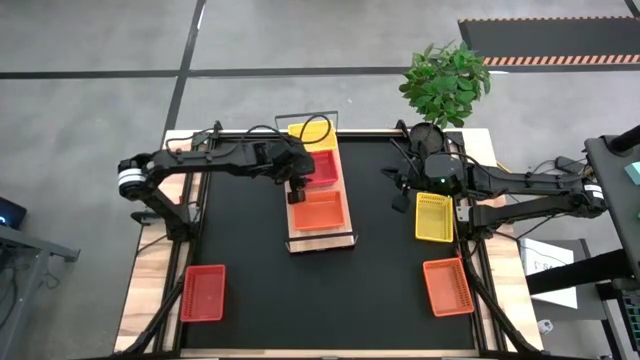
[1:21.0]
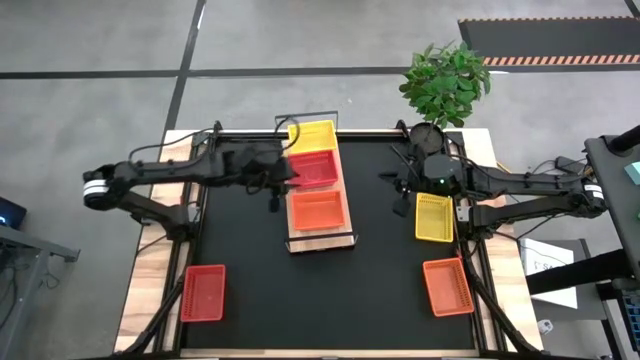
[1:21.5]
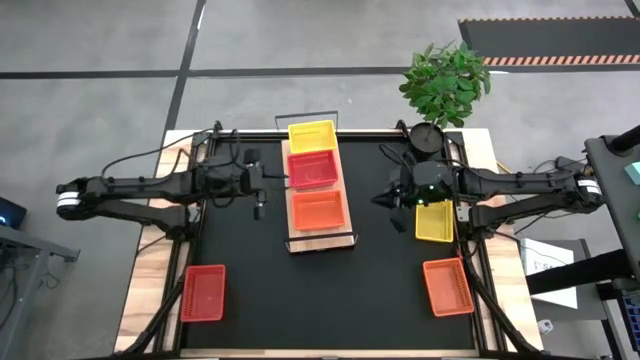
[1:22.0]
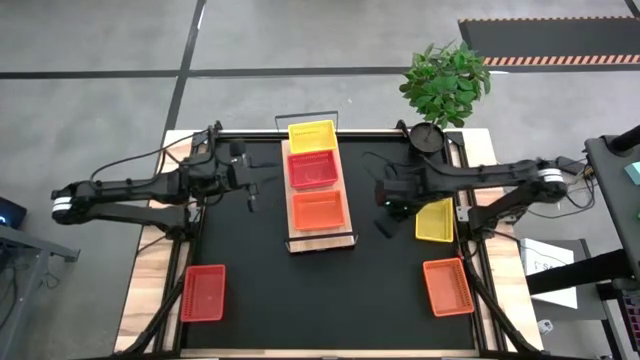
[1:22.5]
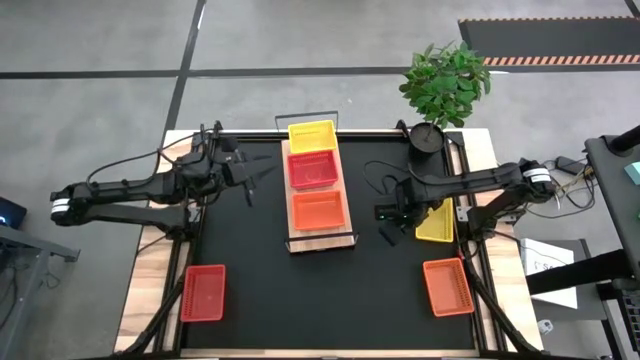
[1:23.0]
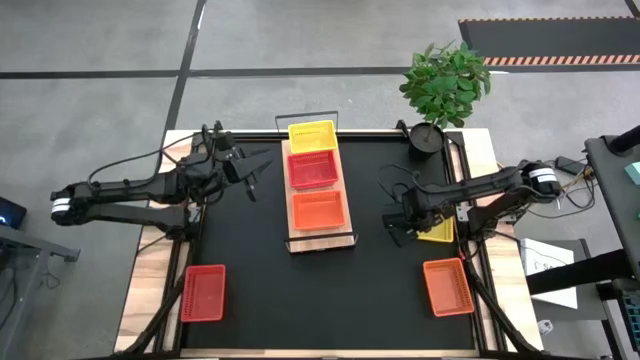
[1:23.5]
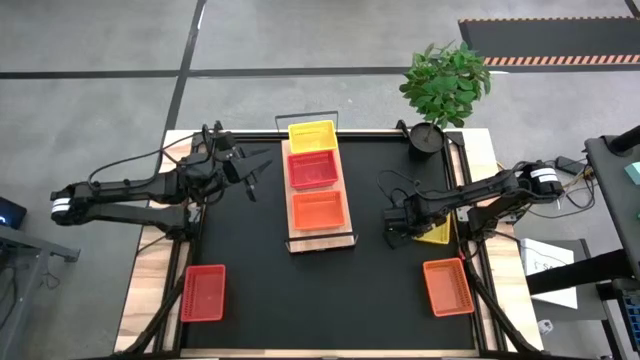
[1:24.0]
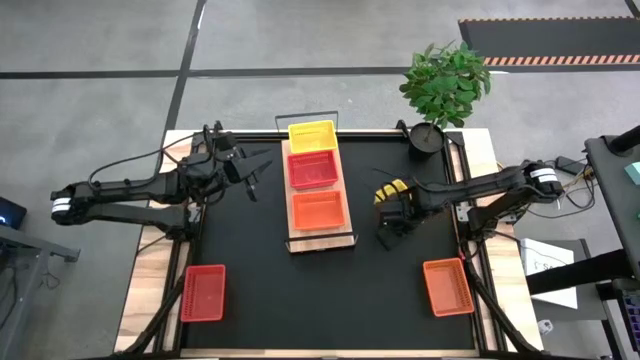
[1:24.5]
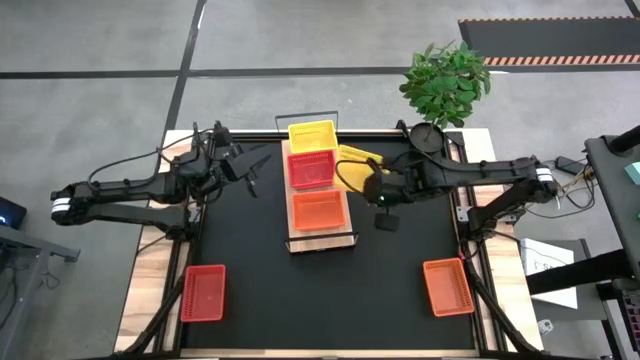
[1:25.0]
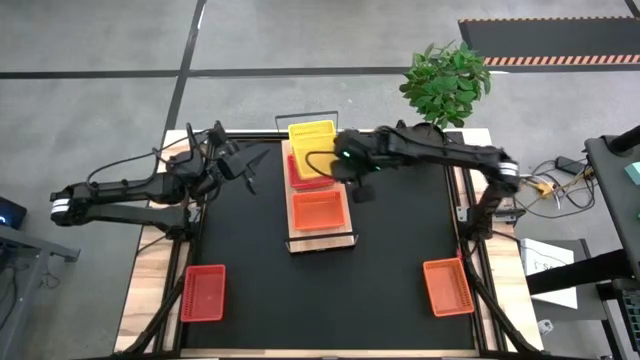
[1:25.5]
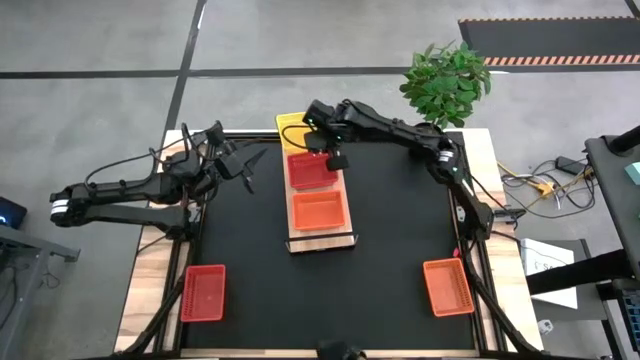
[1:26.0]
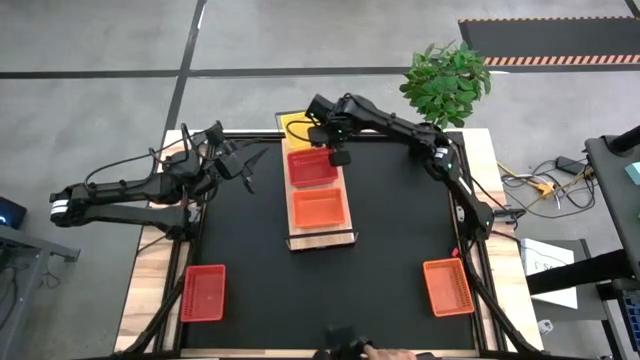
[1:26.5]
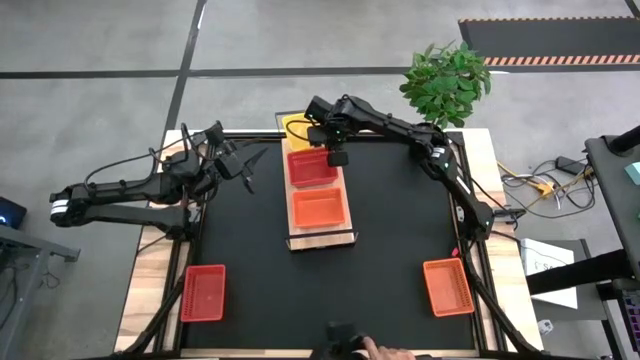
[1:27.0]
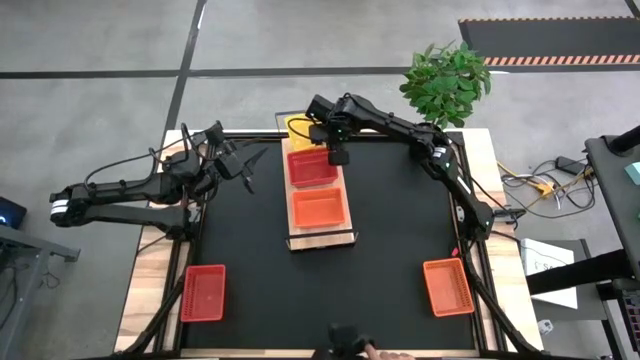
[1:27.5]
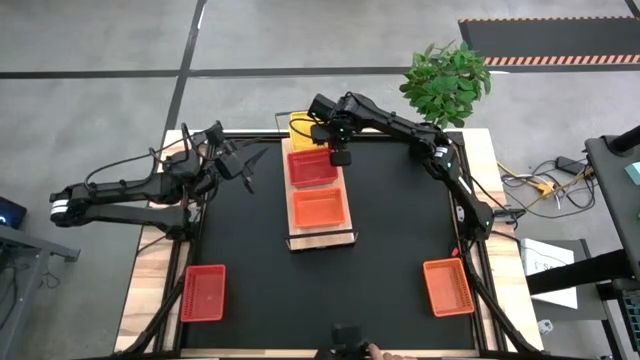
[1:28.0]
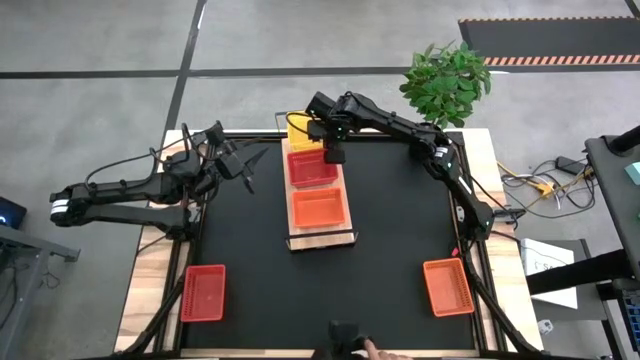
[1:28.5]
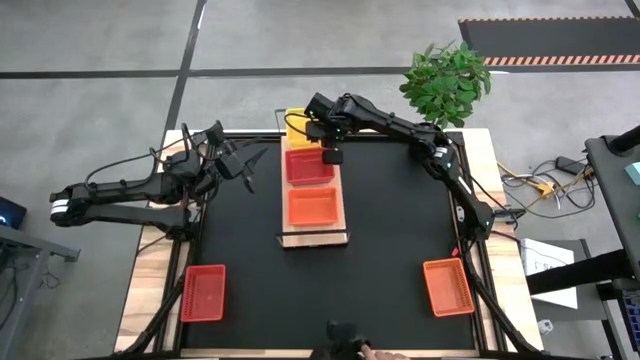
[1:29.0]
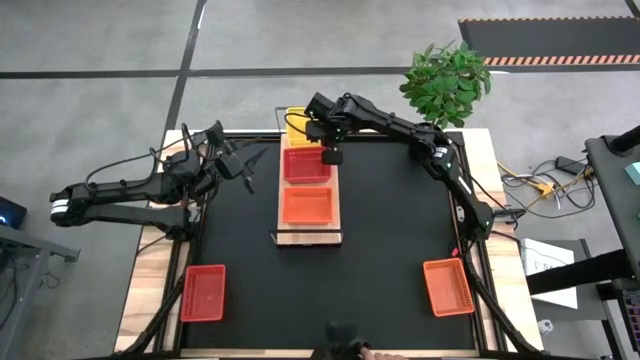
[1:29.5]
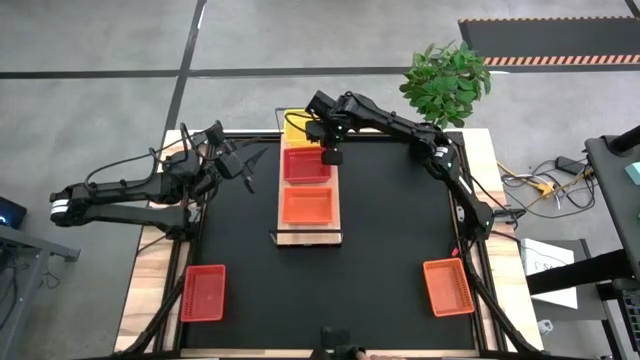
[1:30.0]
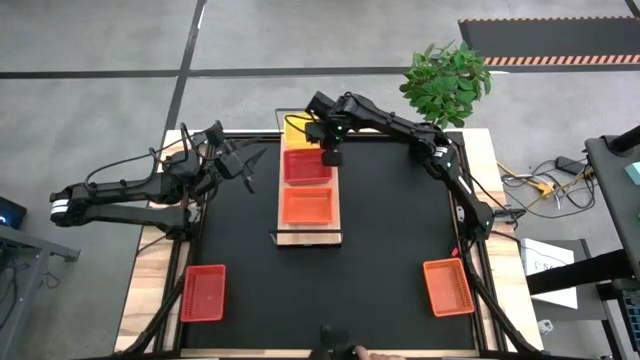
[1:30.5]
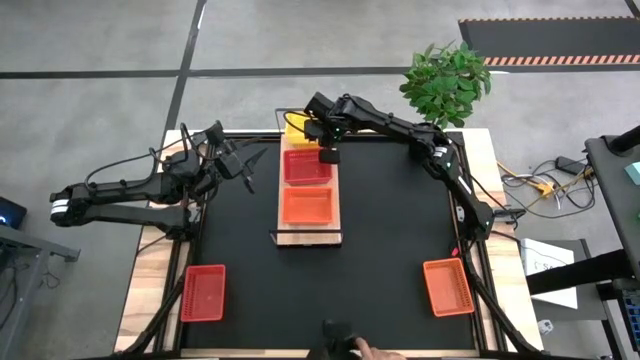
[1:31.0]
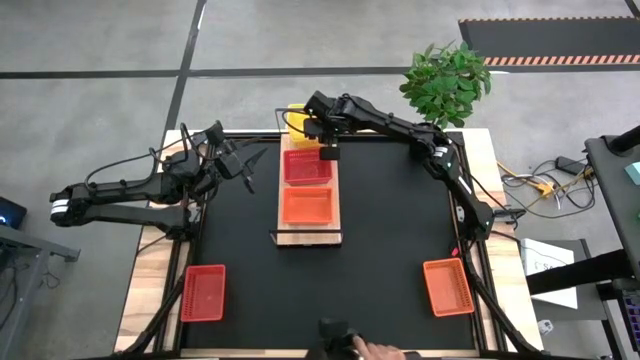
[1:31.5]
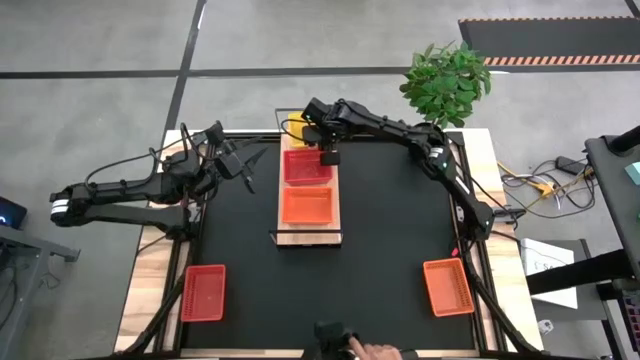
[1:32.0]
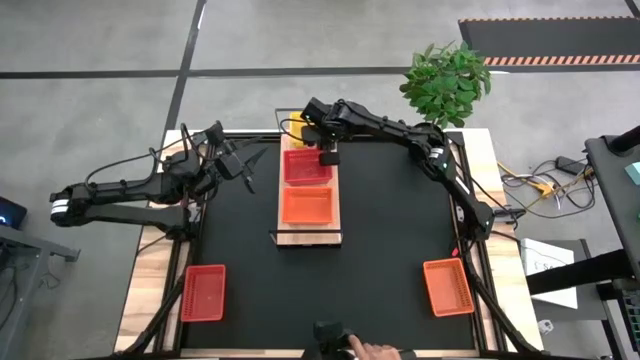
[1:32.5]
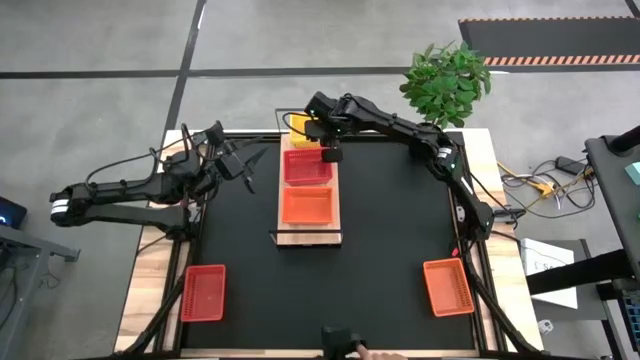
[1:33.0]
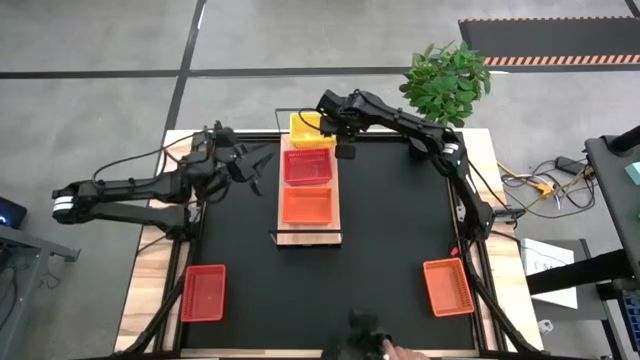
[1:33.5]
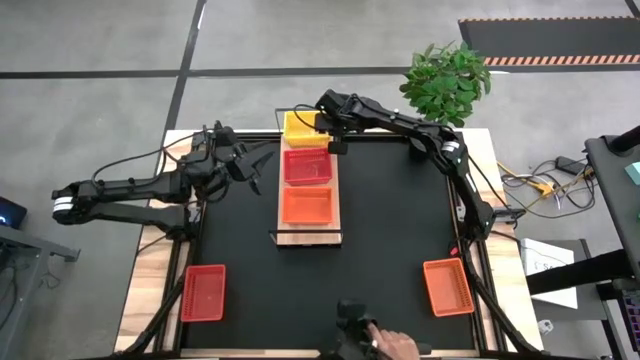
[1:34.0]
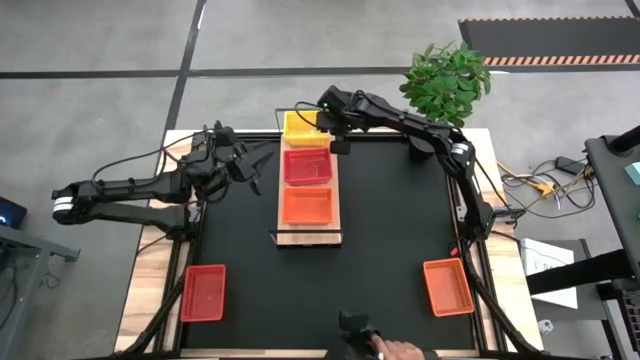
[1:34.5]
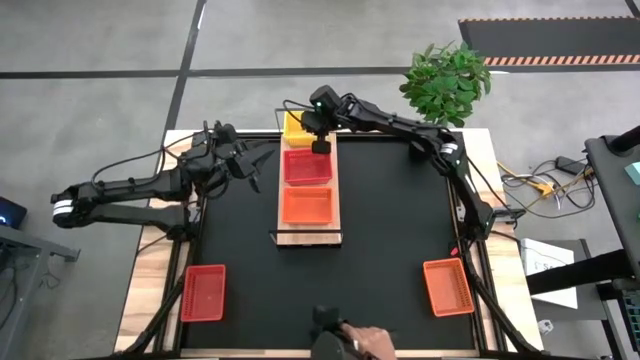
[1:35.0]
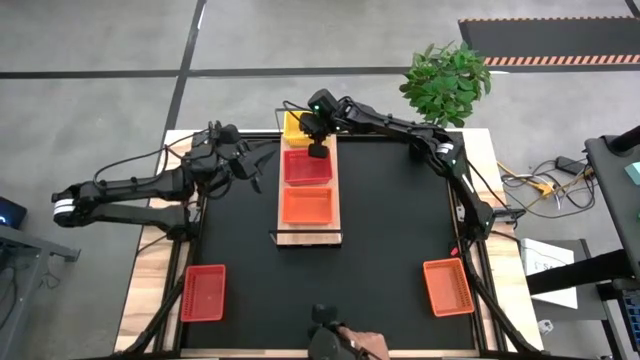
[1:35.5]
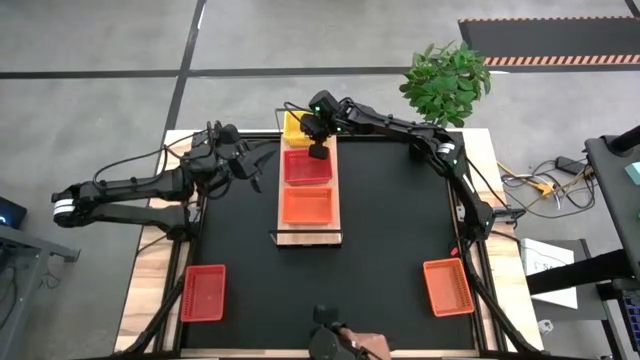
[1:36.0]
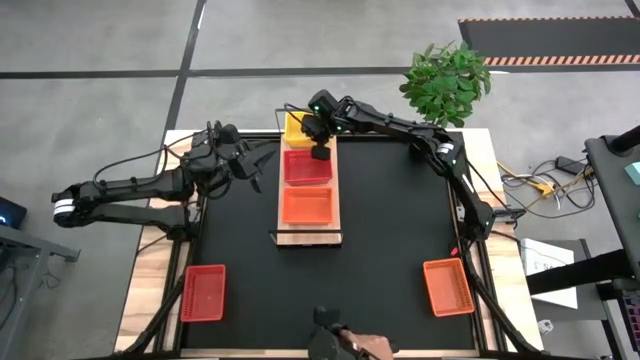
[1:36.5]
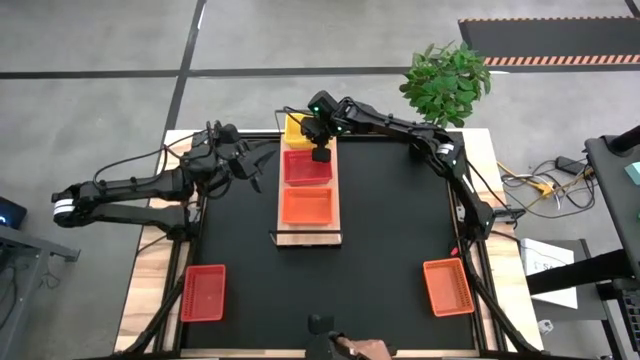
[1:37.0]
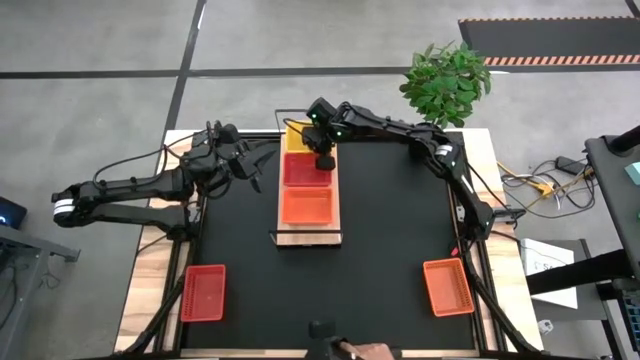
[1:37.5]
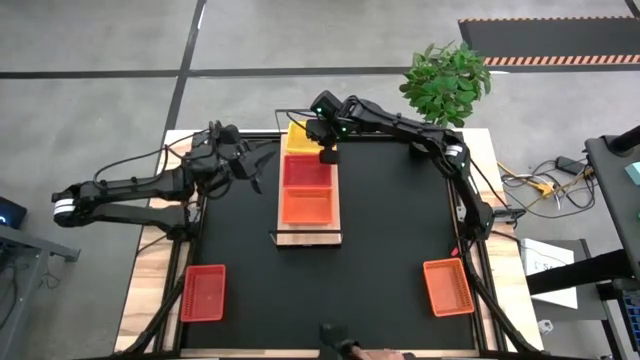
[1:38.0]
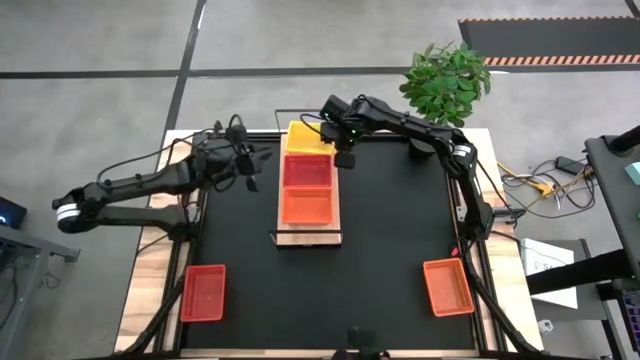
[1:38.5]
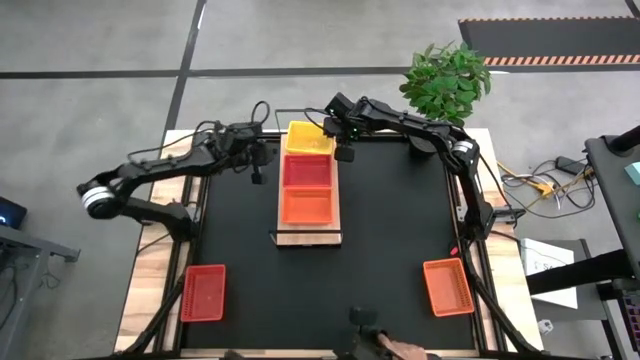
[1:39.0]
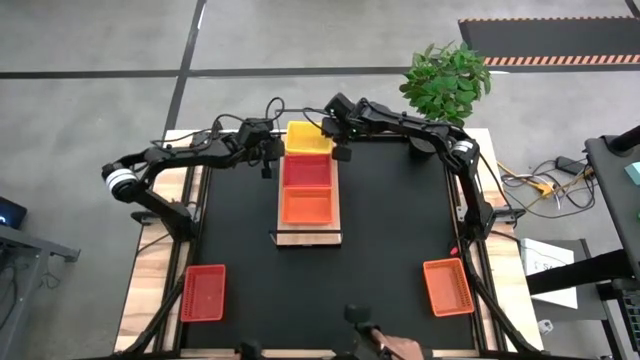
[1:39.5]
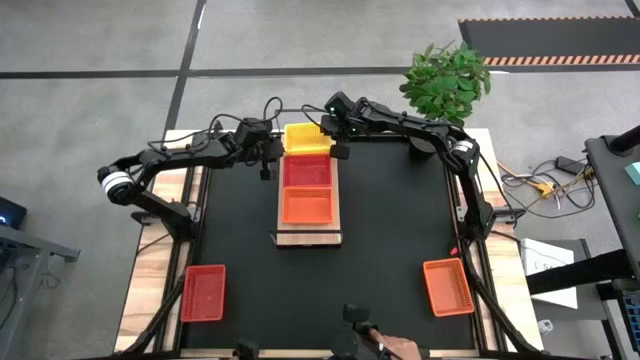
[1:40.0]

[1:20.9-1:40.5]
Task: Stack baskets on shelf by color
Stack the yellow bin on top of the stacked yellow bins on the shelf

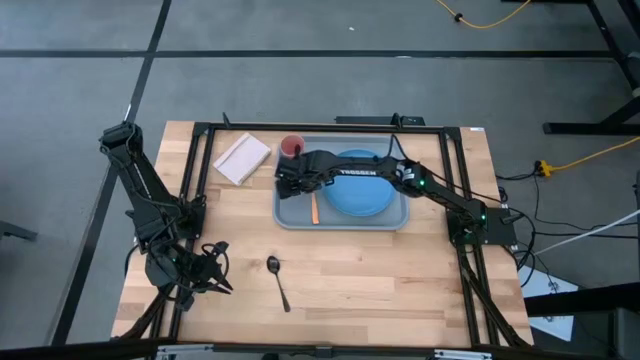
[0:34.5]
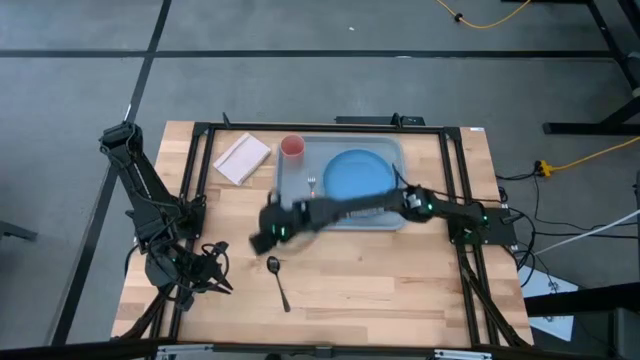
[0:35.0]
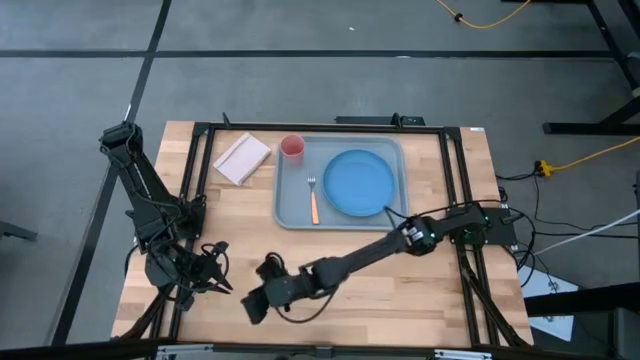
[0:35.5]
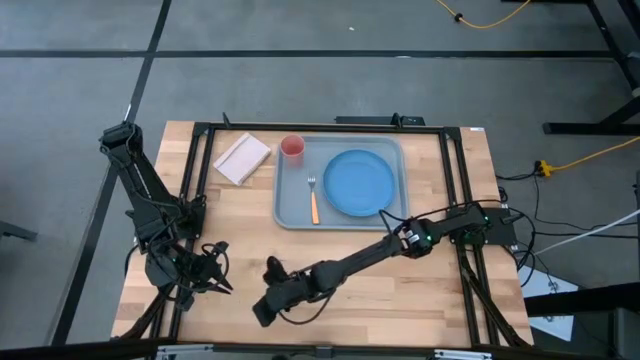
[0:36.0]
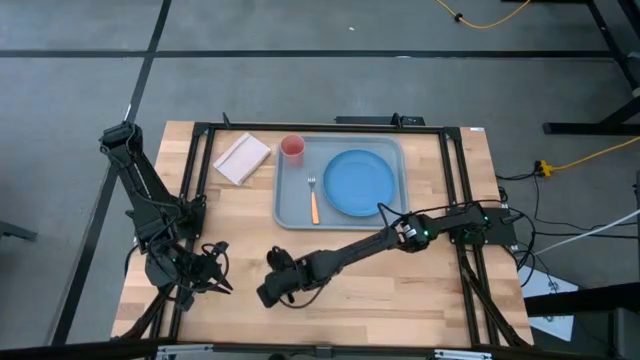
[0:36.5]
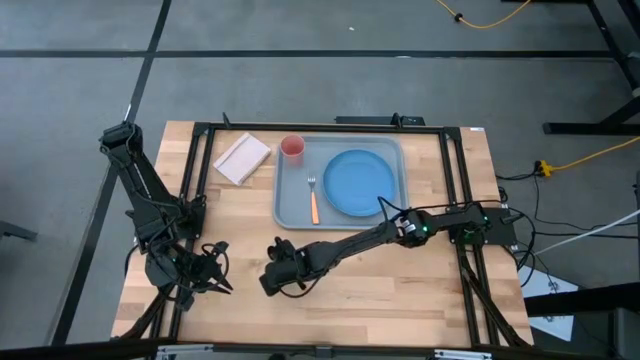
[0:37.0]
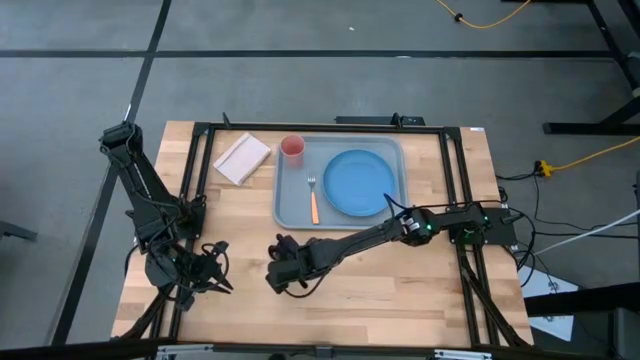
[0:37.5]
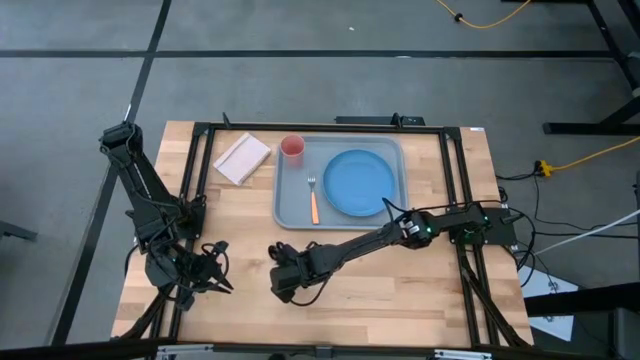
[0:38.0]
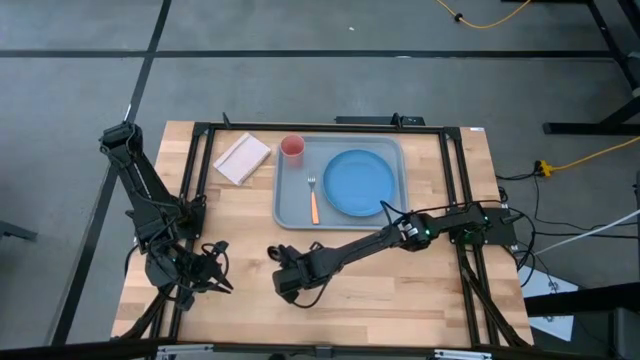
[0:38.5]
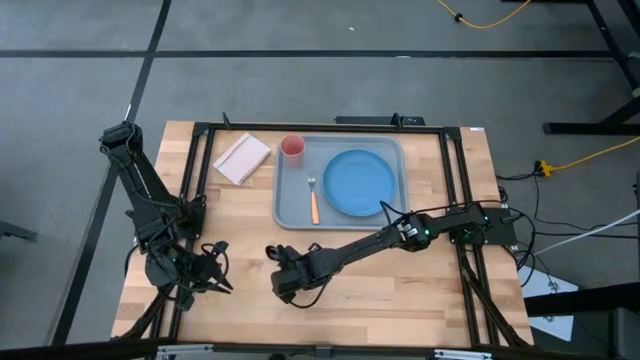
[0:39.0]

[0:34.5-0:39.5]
Task: Pick and place plate/cup/fork/spoon on tray
Put the black spoon on the gray serving tray to the left of the orange fork
